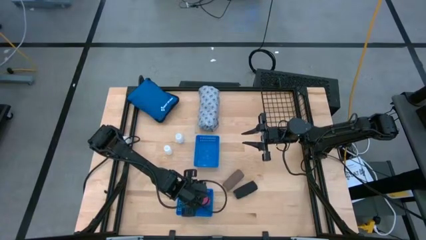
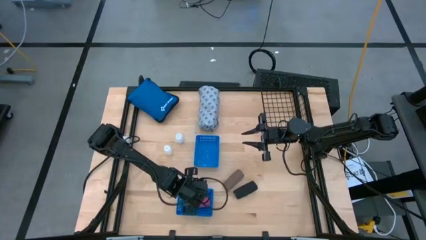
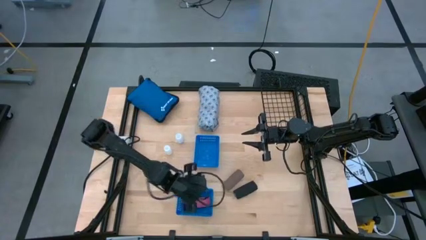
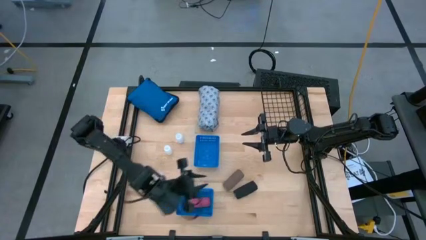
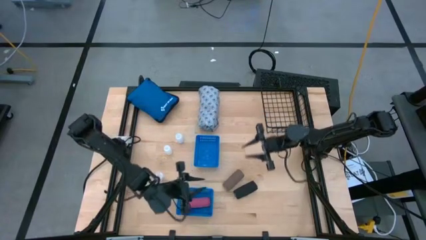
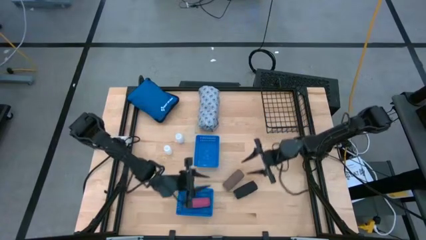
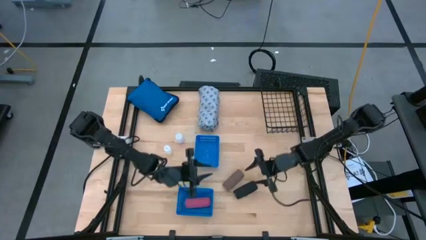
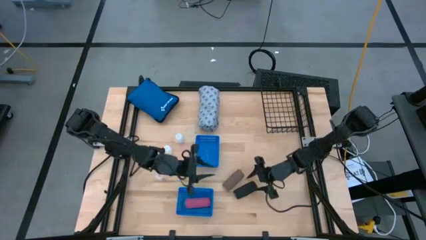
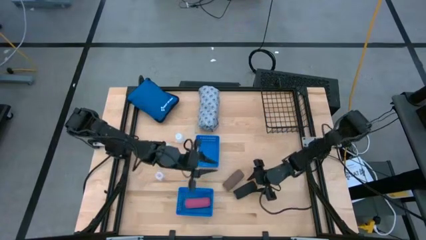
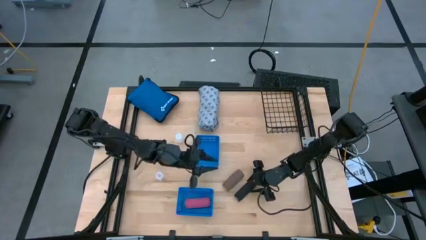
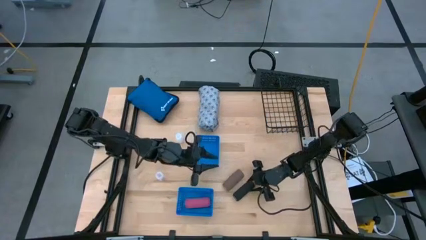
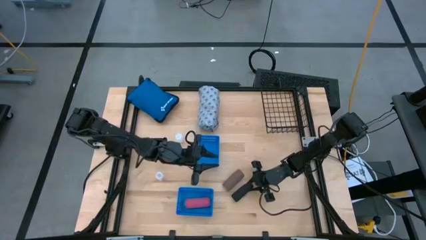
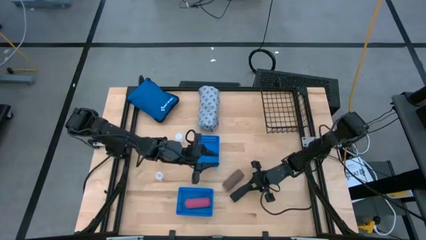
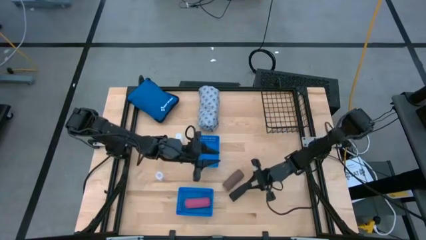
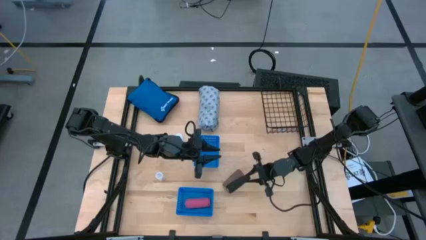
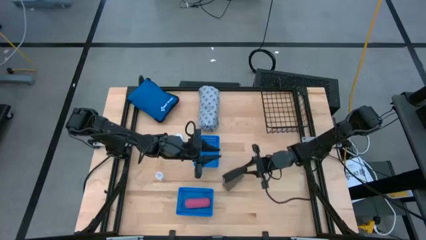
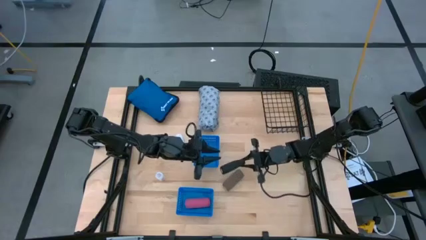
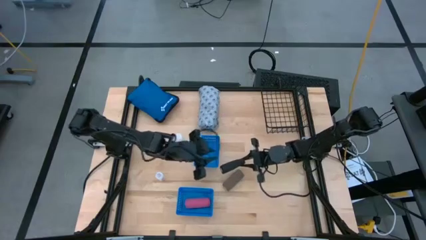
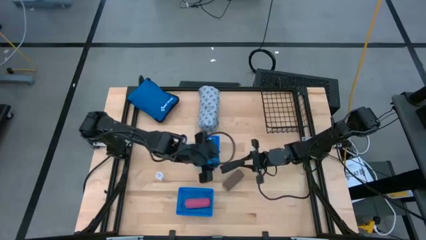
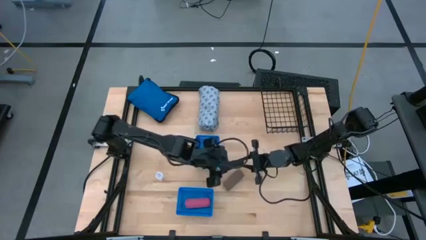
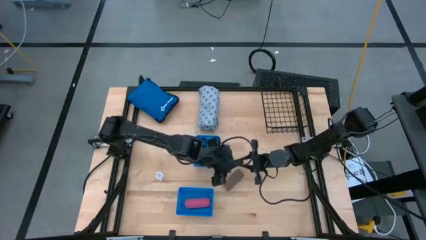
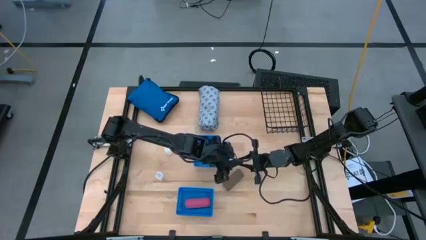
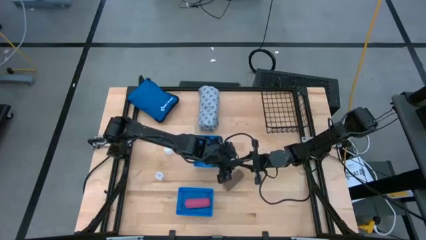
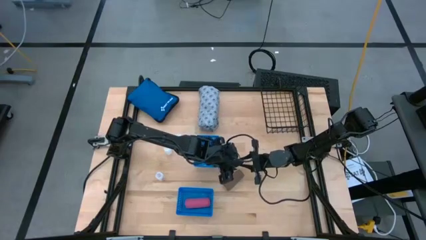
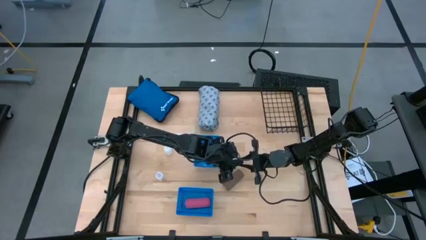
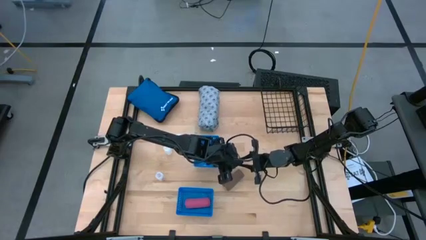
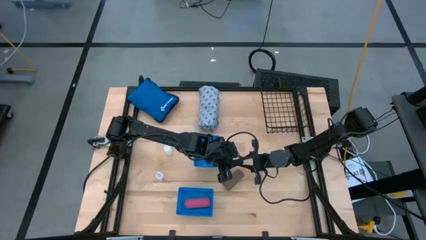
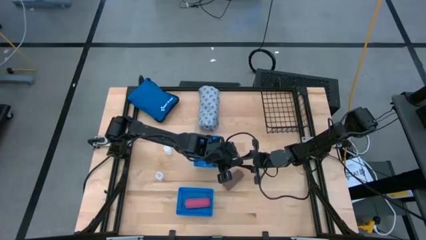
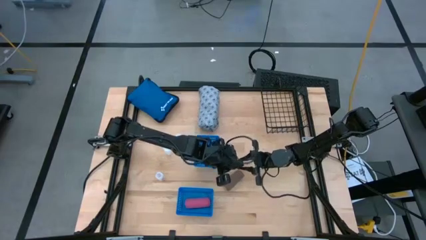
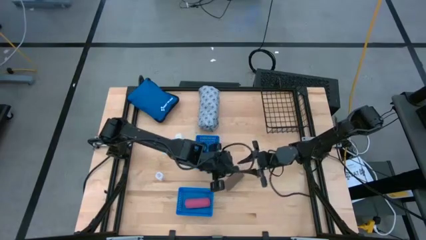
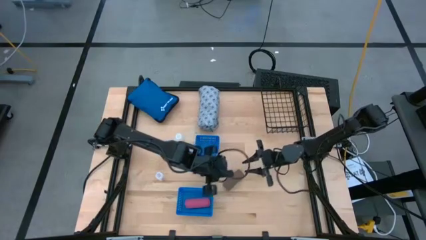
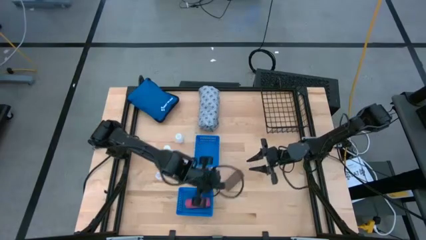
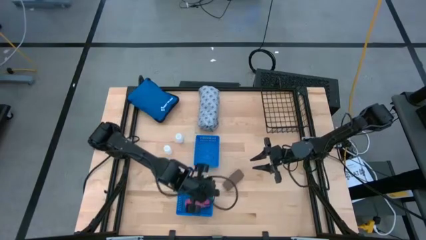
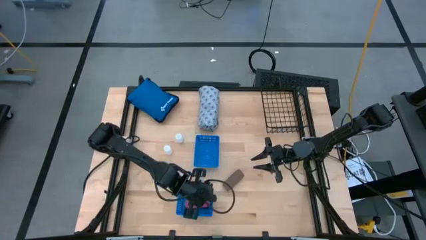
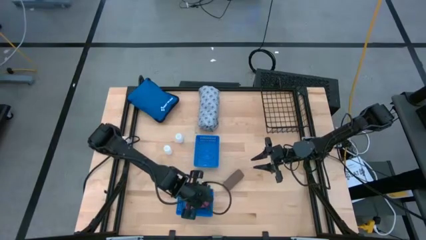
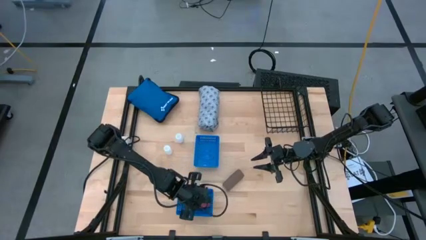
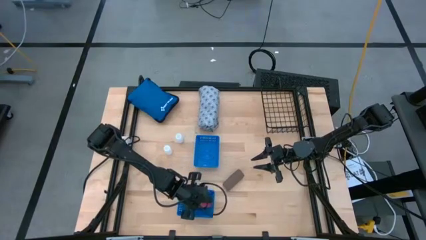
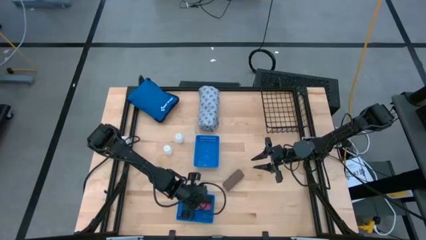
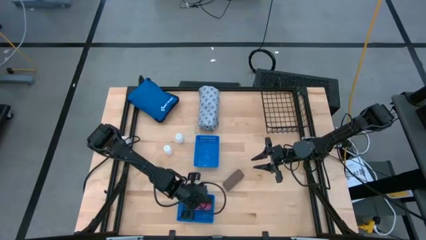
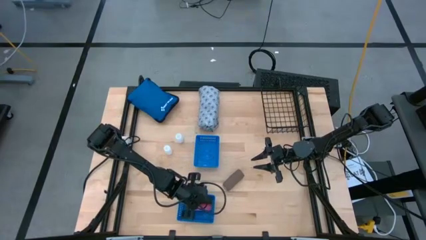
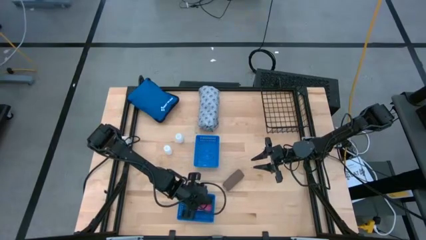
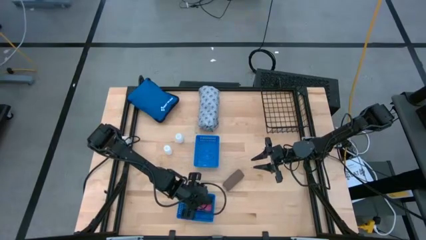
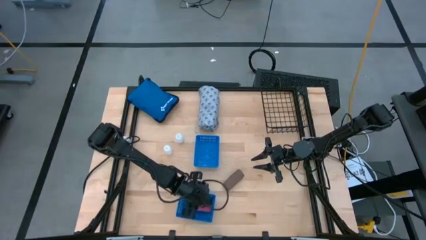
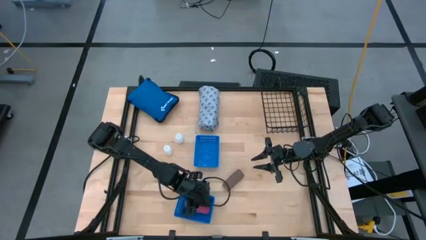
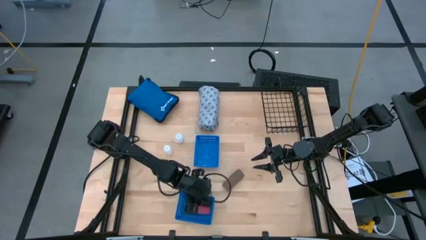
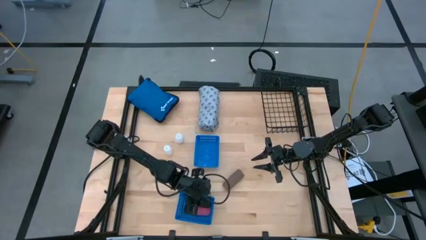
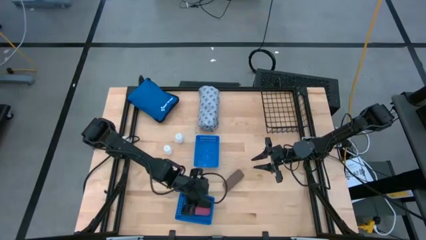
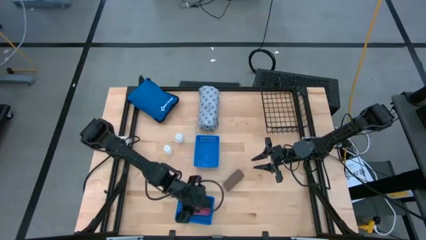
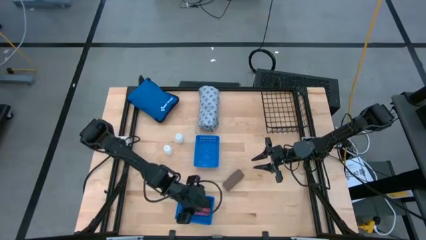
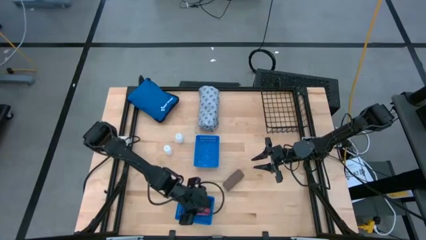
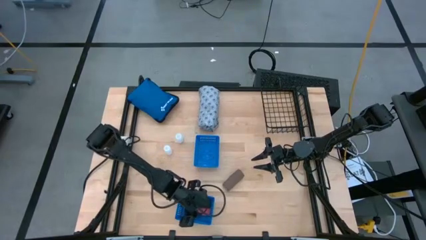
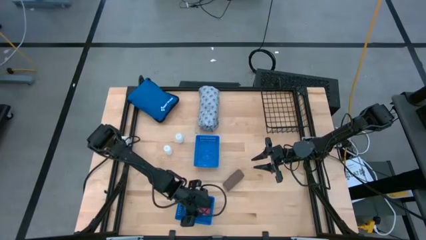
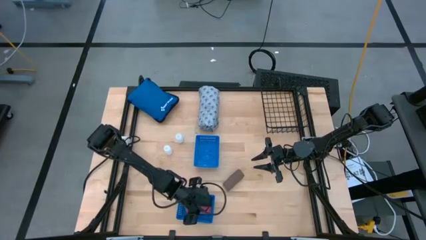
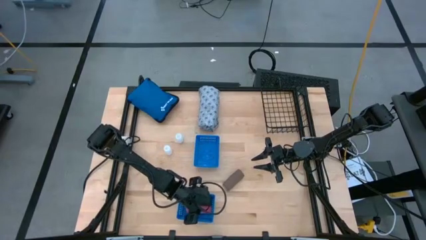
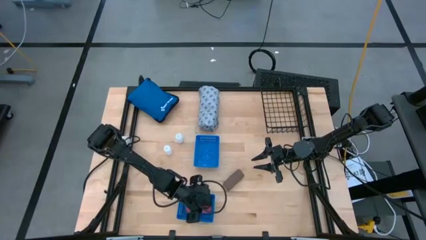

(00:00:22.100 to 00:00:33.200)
Task: Pick & place medical supplies in basket/bin
Put the black bandage into the bottom blue basket

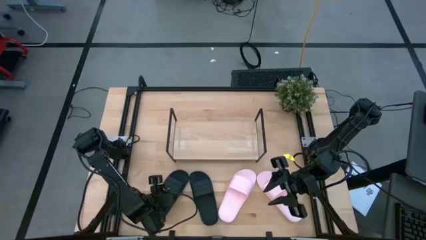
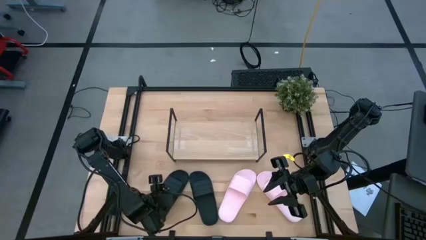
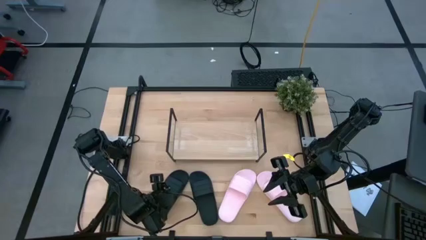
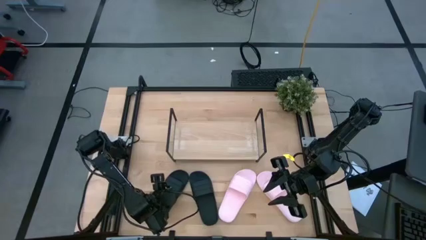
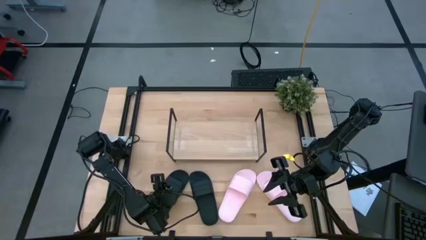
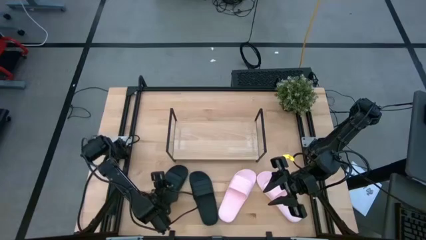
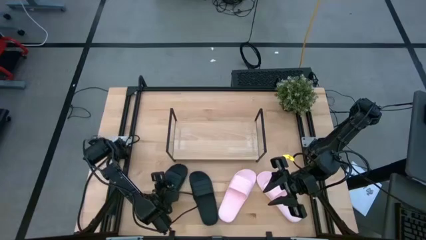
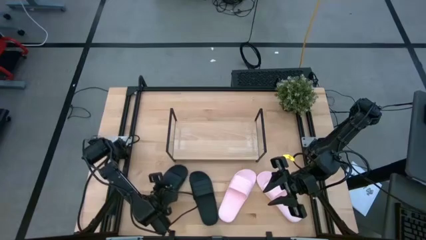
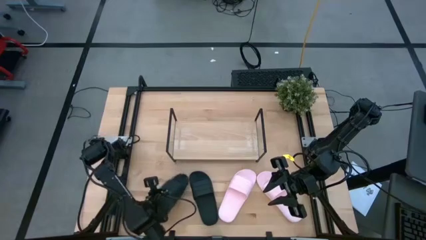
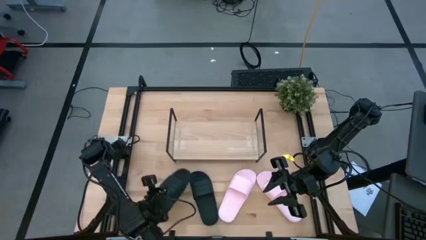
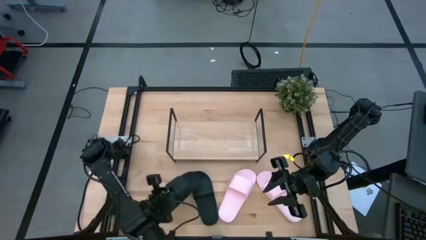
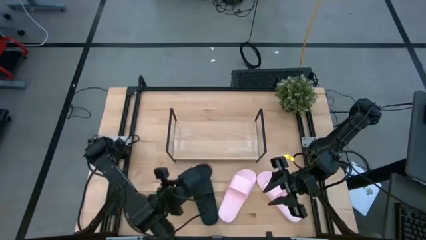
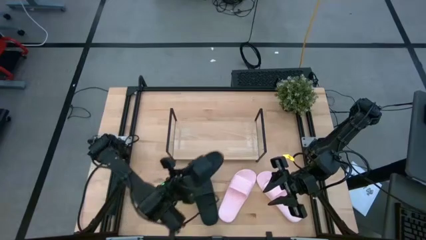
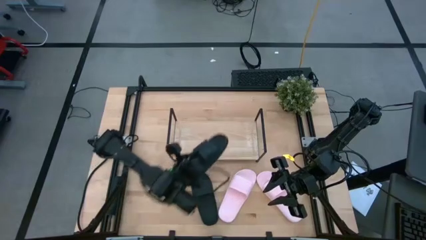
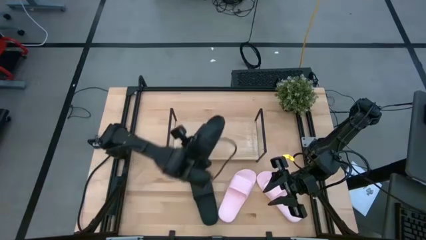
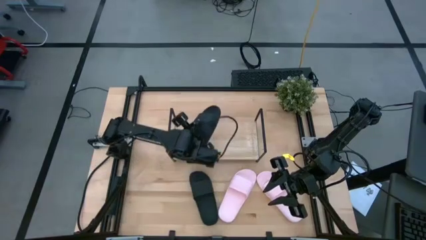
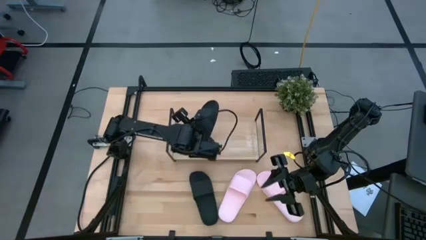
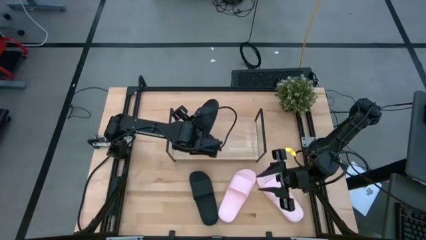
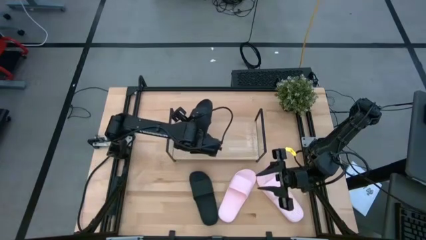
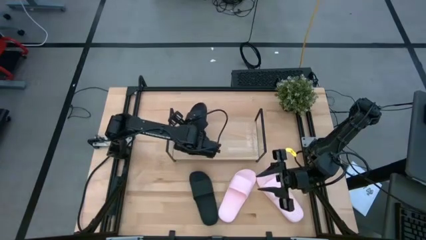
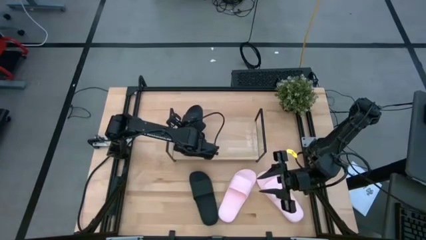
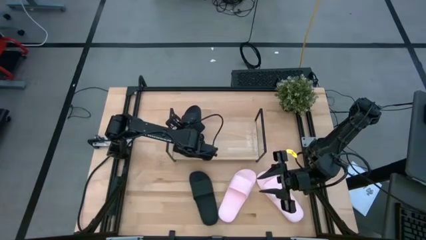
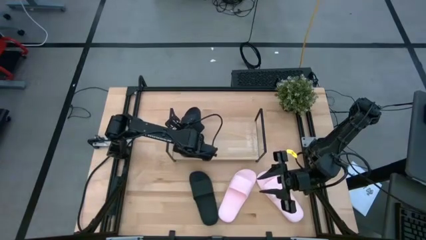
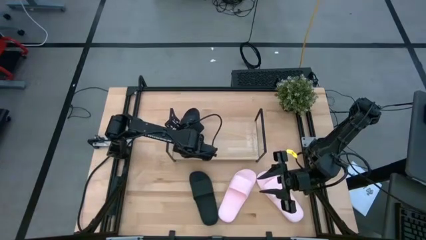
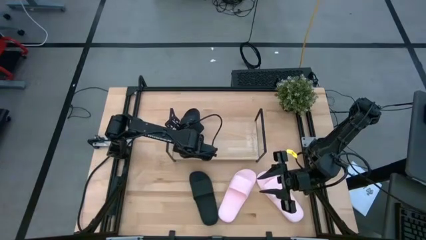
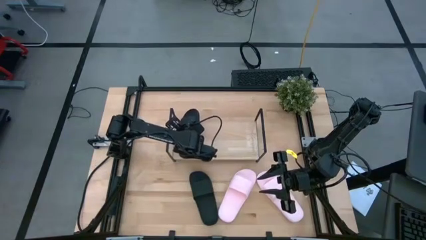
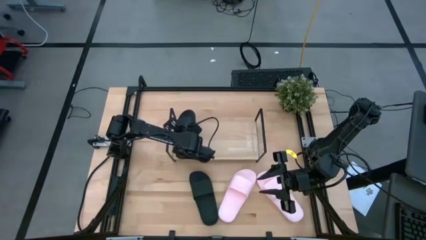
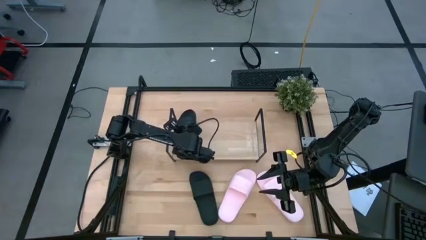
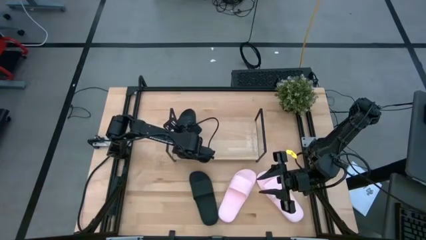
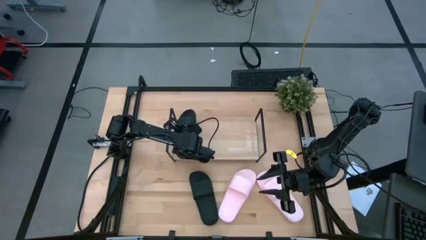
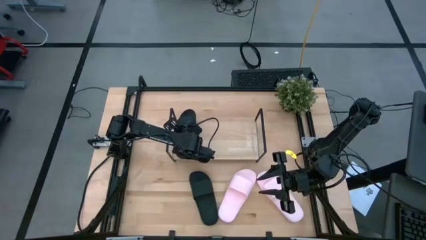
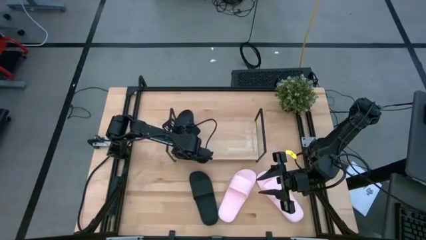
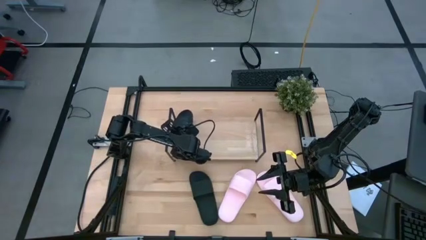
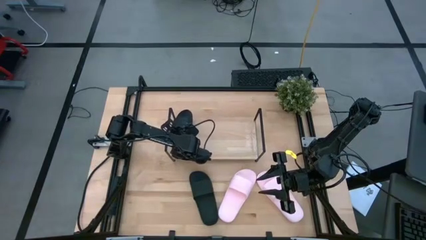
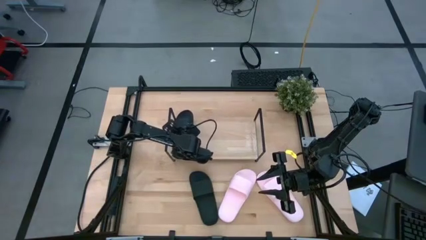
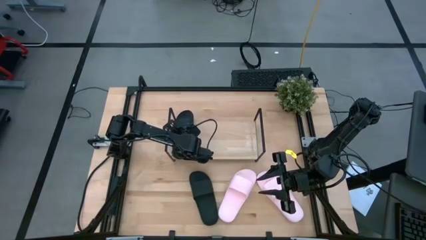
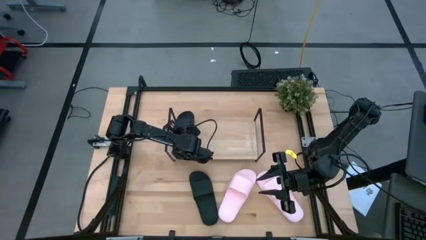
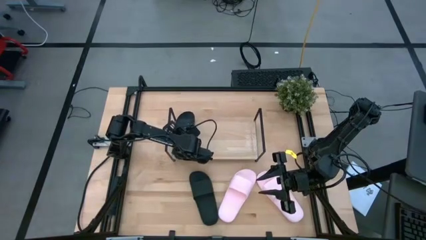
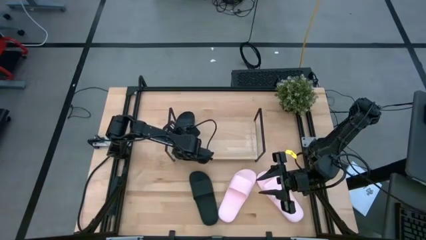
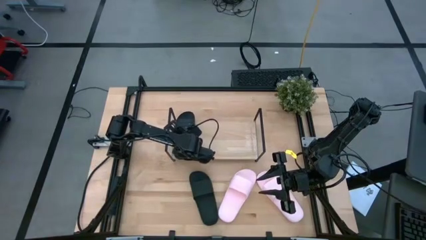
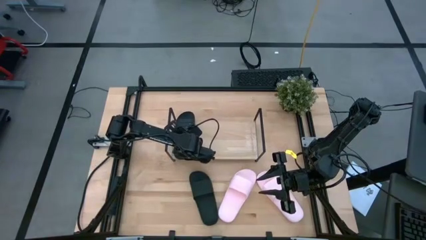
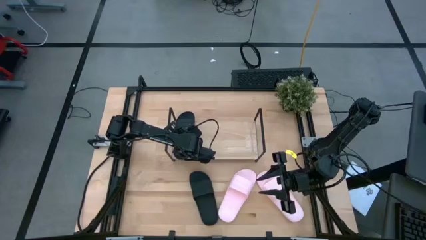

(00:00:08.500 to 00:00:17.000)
Task: Pick and place slides into the shelf
Put the left black slipper on the shelf
